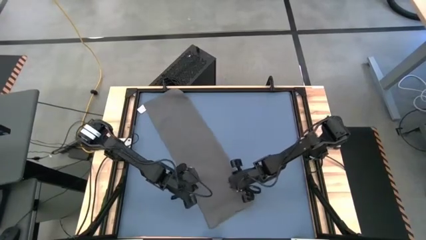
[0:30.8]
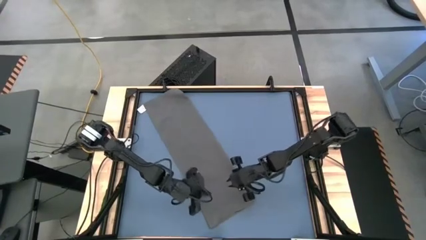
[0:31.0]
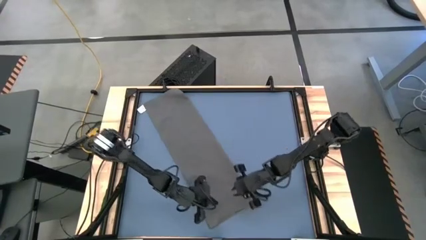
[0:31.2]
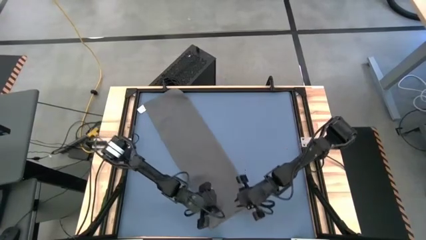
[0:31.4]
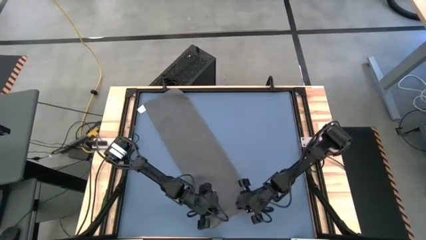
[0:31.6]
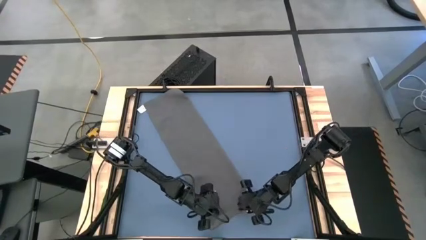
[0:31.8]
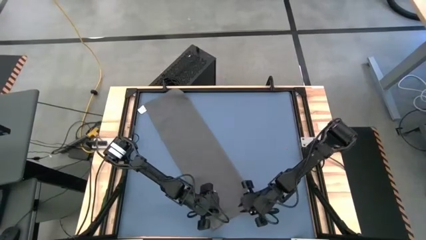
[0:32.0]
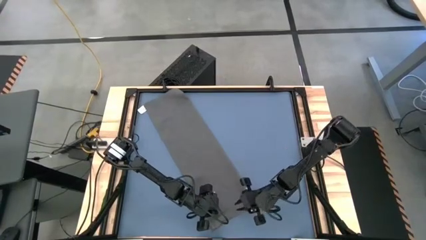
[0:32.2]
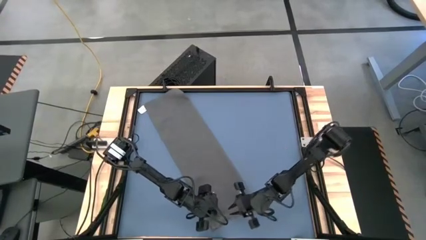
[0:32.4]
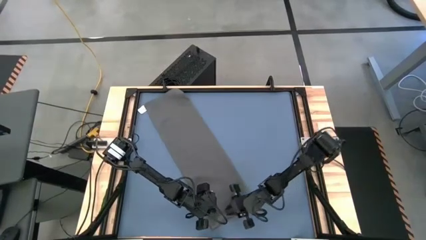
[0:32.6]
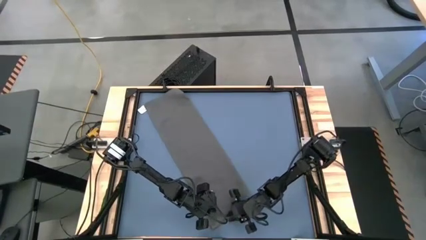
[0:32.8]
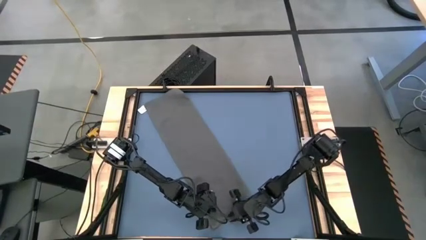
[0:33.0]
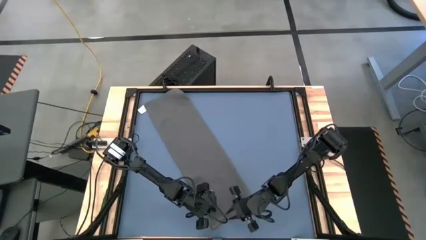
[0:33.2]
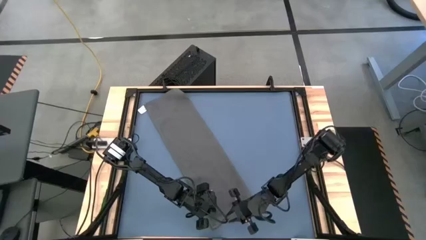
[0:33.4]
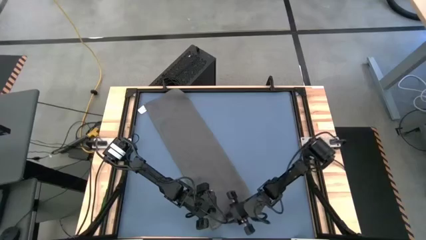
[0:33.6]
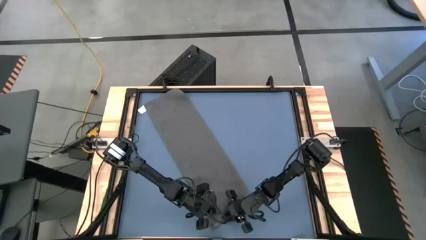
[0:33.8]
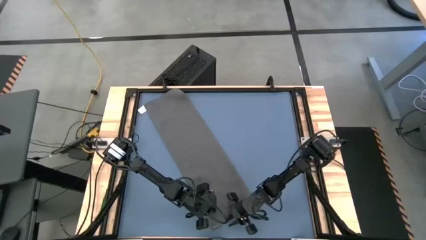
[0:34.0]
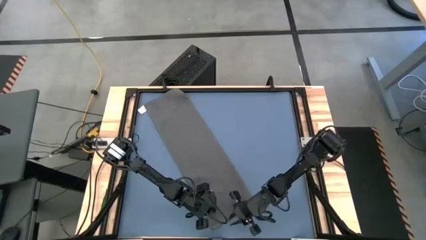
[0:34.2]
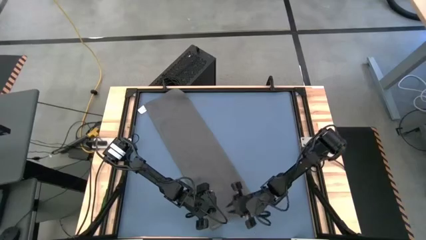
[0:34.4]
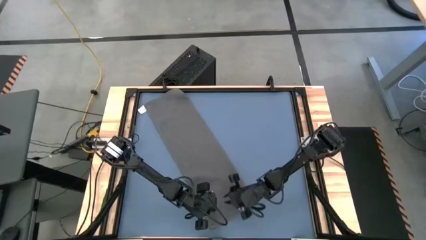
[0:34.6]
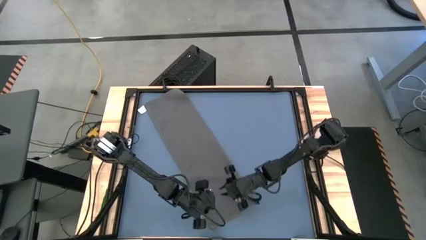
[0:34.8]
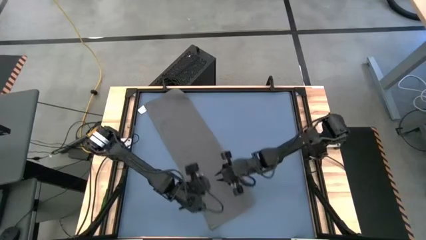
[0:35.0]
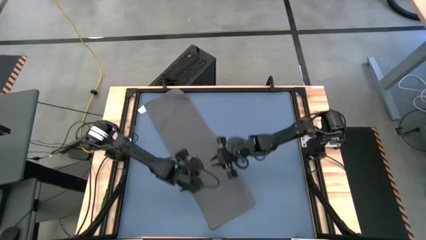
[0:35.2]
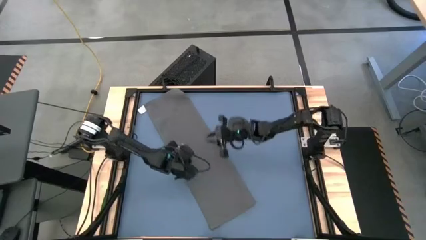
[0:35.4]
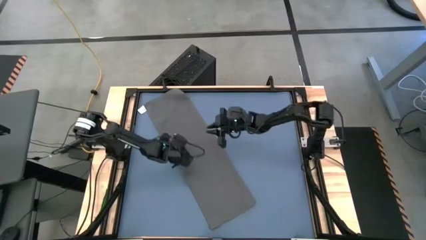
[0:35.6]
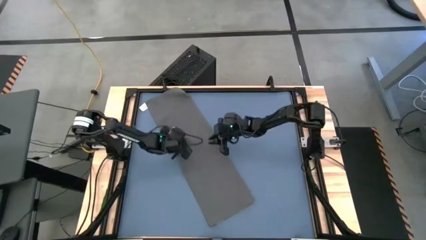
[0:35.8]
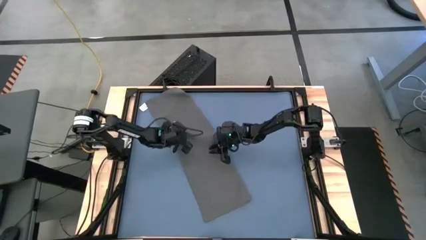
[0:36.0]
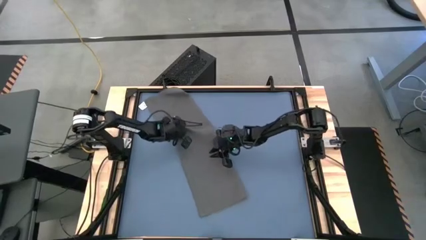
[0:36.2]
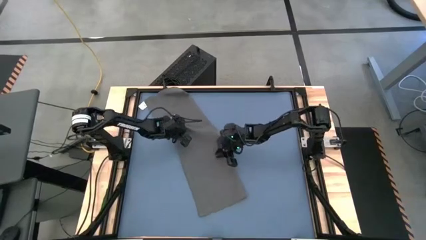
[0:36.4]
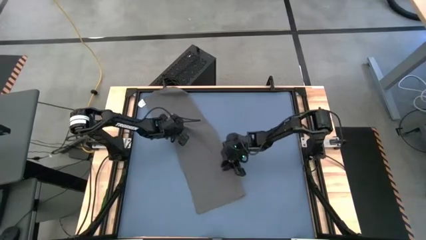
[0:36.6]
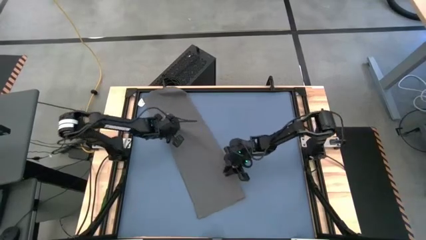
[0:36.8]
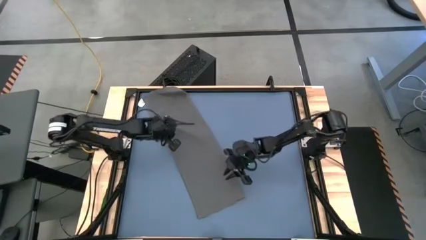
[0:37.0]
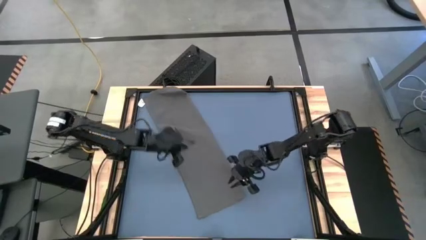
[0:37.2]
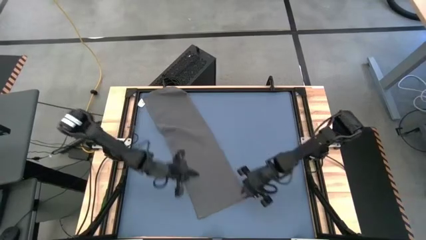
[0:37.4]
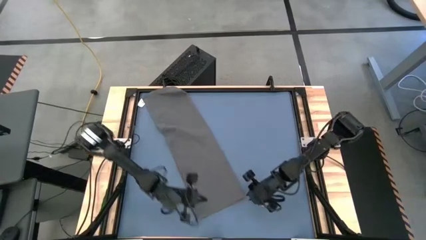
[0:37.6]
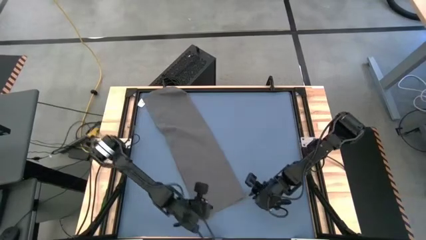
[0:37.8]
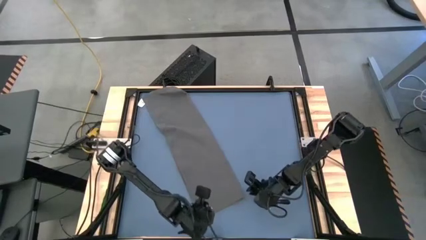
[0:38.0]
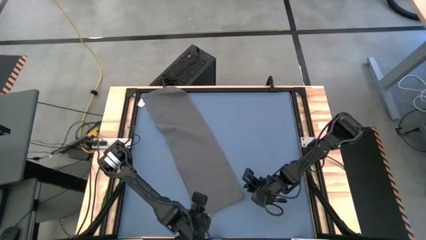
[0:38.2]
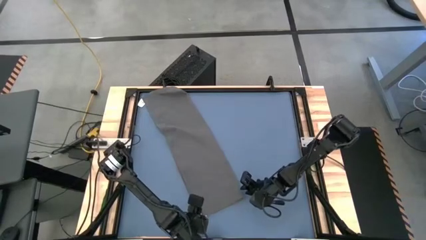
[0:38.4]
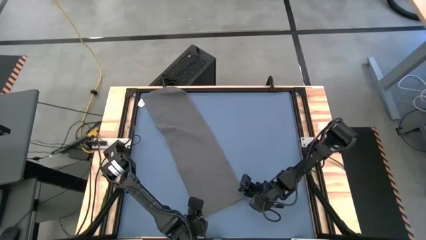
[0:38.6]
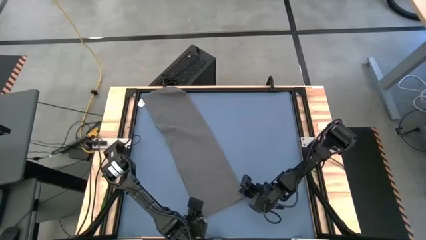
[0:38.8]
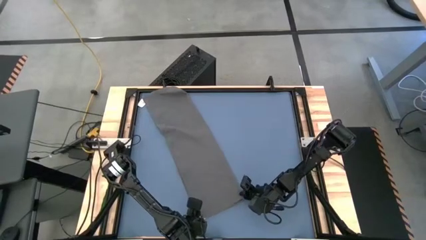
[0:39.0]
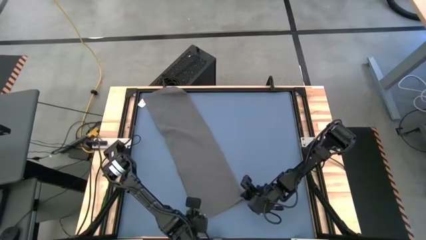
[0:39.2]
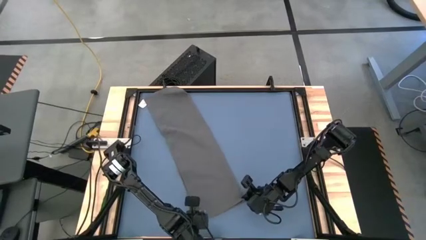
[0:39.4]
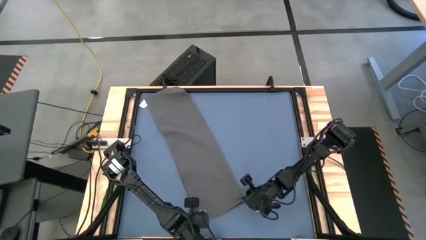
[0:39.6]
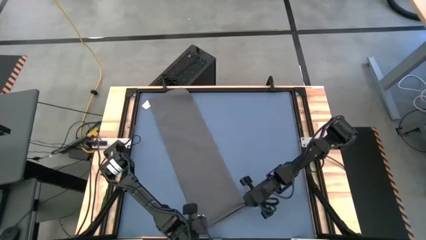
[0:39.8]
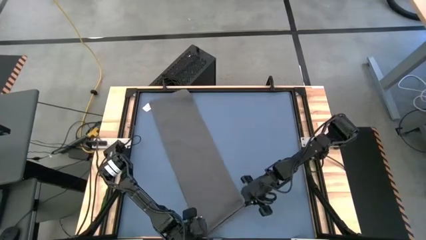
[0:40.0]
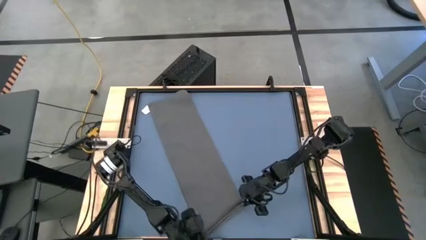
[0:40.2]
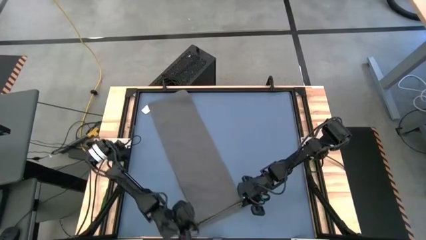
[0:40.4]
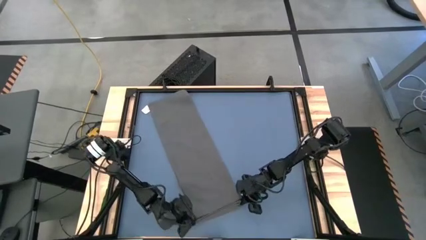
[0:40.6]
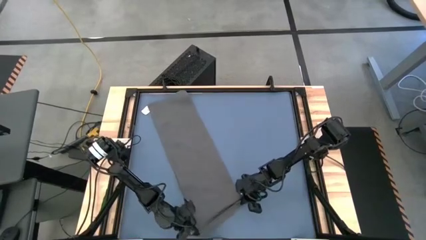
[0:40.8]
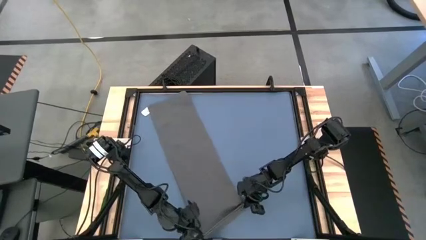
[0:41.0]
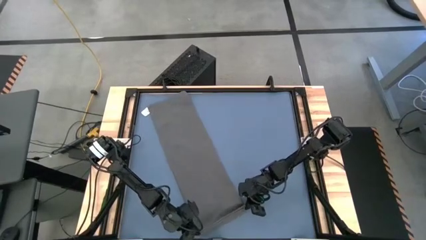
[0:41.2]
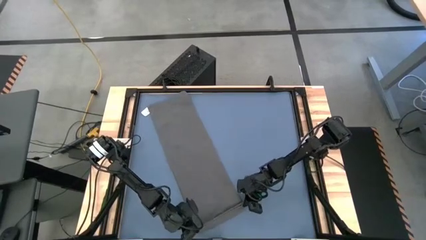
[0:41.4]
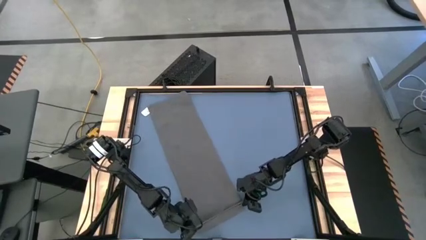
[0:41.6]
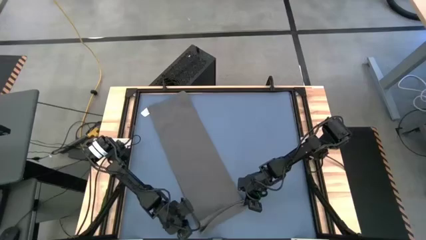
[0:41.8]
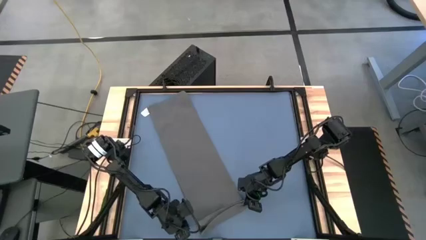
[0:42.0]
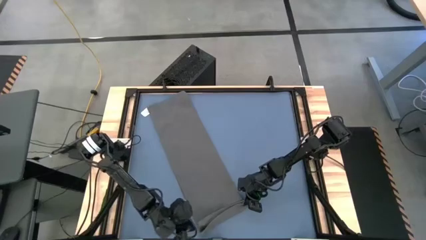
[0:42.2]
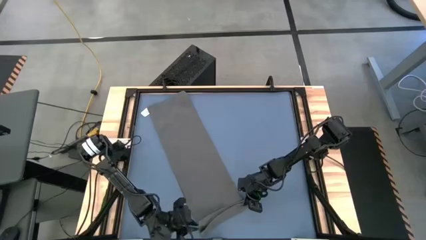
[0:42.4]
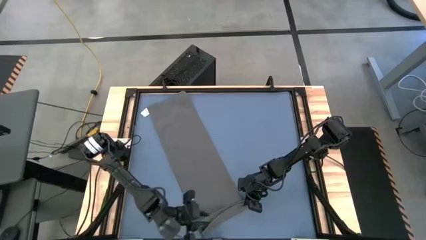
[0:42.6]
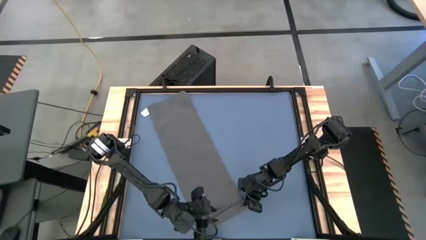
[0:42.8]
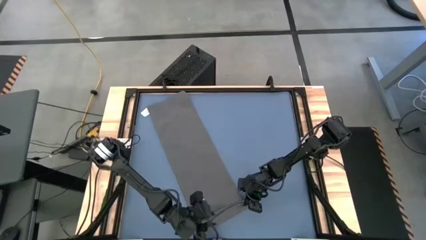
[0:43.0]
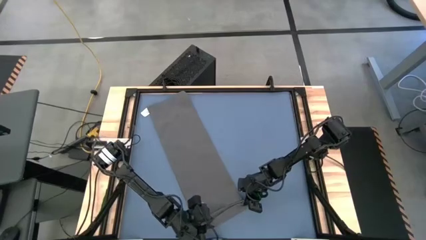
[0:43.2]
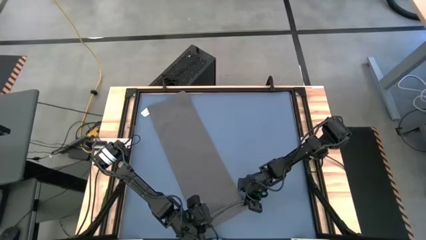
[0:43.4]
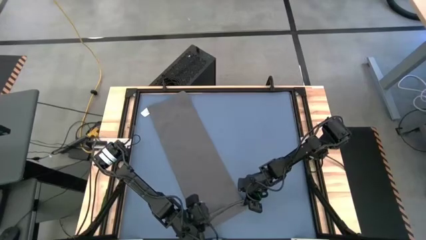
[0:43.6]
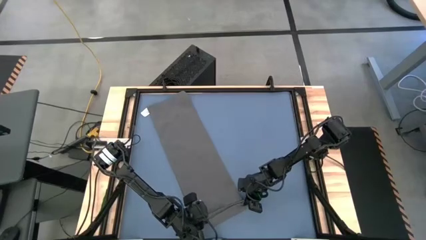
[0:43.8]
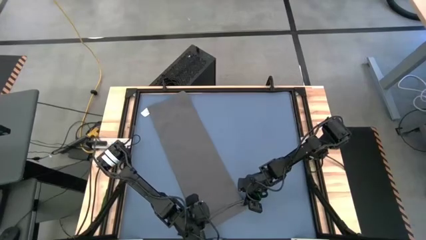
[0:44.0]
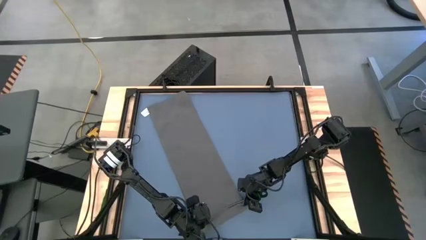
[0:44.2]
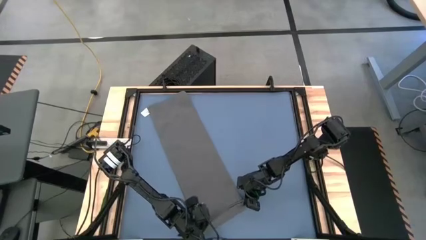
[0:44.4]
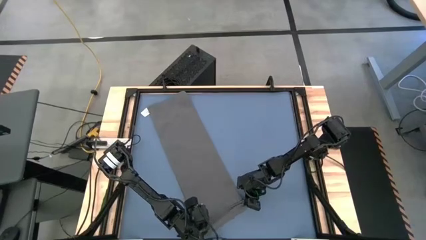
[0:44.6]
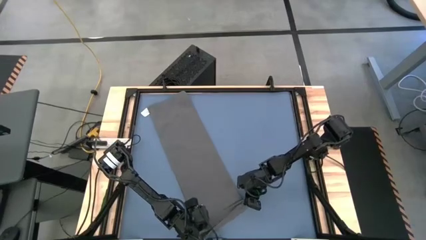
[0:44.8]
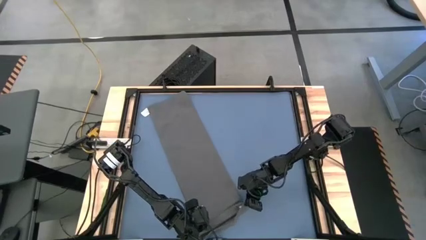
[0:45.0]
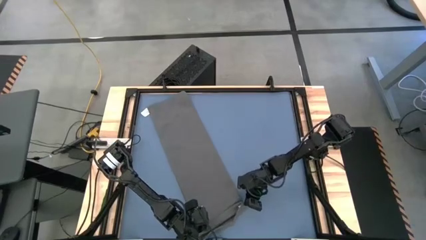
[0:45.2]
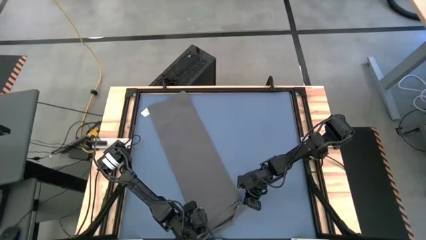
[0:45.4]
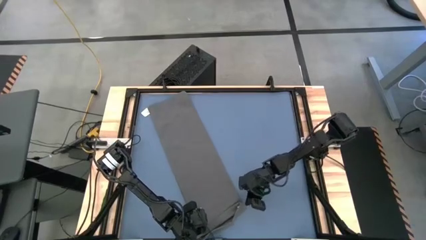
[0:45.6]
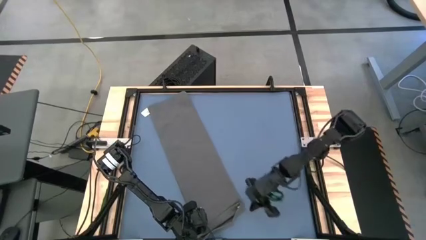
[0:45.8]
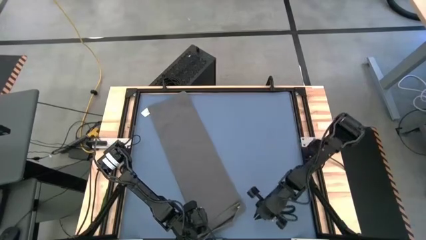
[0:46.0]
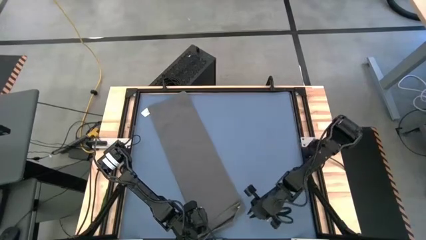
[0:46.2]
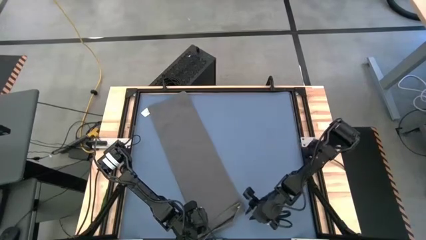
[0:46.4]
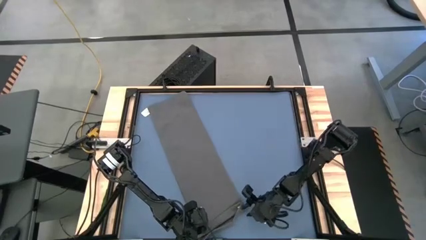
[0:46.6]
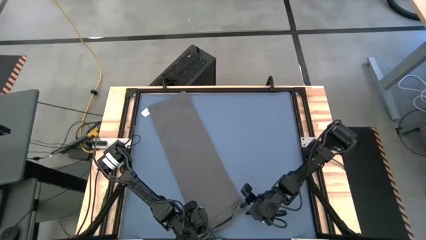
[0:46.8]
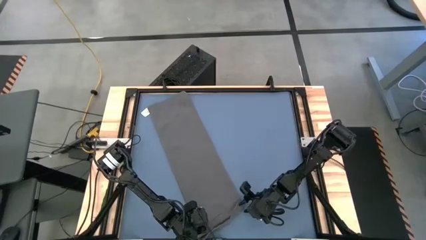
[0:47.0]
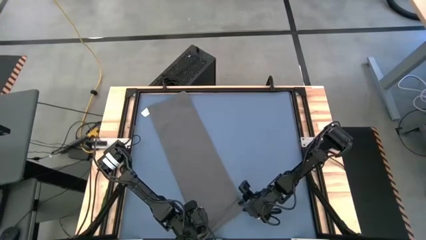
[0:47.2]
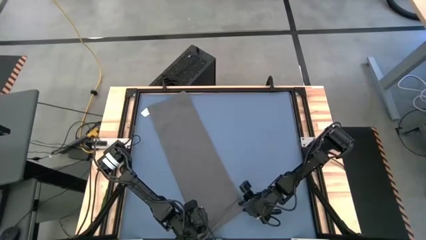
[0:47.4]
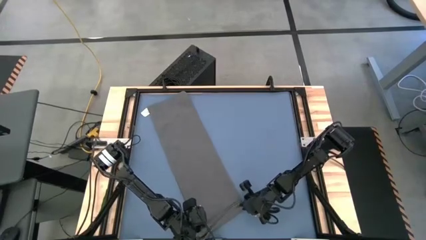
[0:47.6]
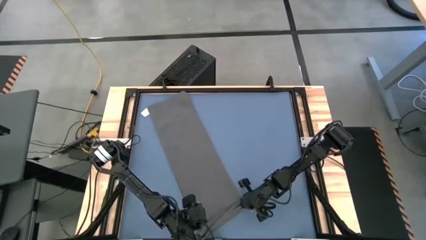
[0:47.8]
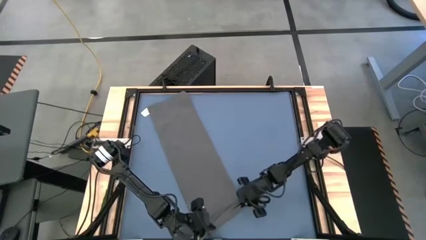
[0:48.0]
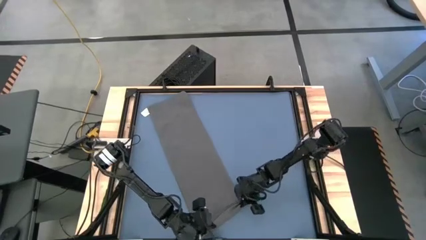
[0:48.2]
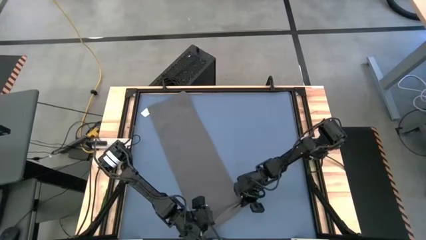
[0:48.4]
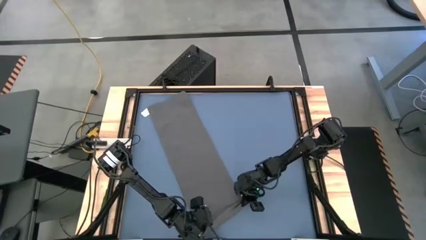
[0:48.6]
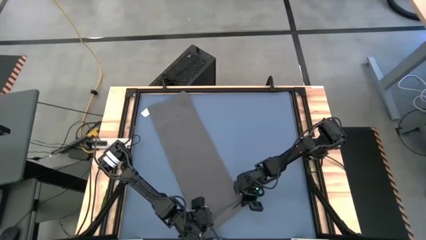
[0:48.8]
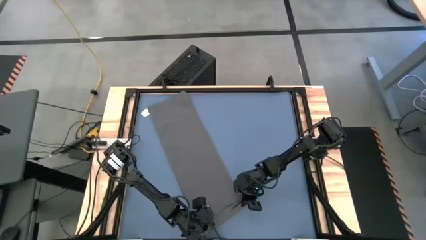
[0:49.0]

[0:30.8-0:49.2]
Task: Roll towel into tight, uniform cylinder
Roll the gray towel
